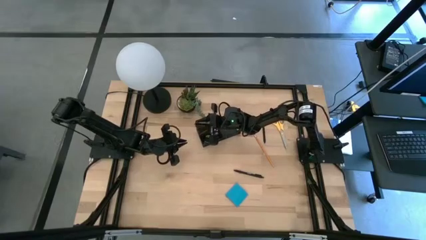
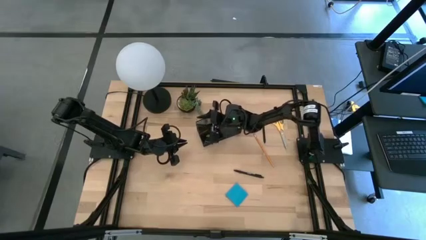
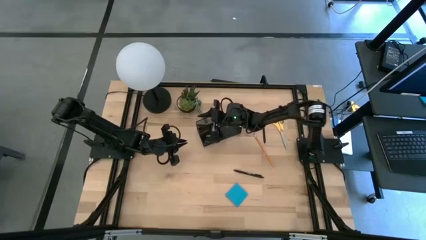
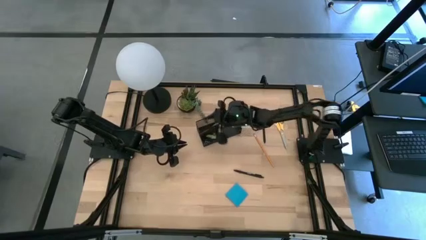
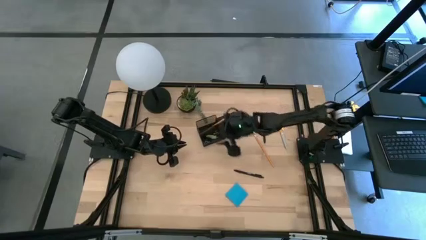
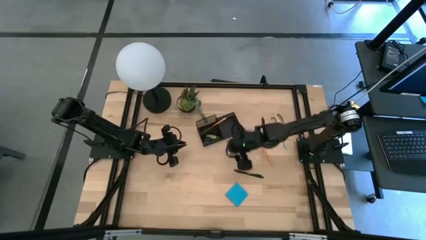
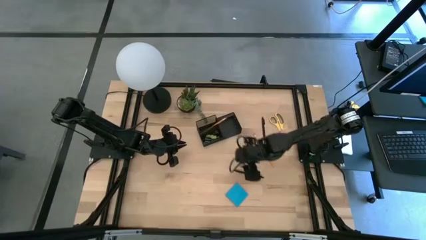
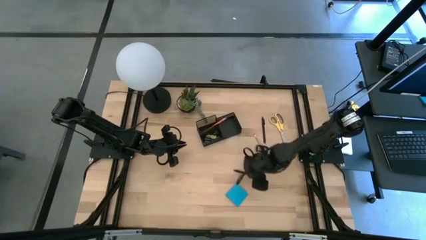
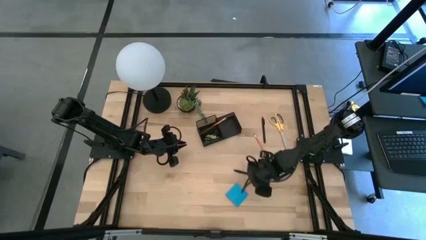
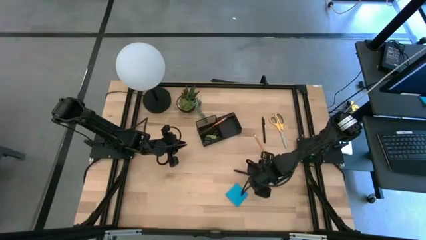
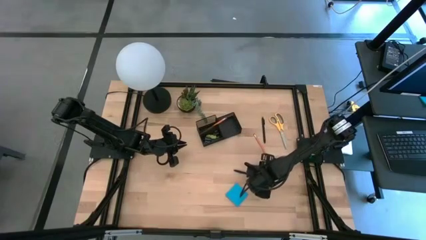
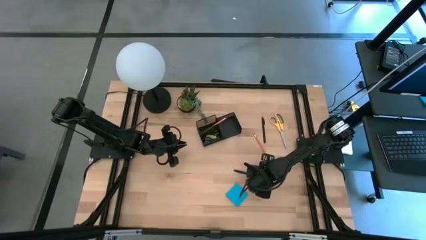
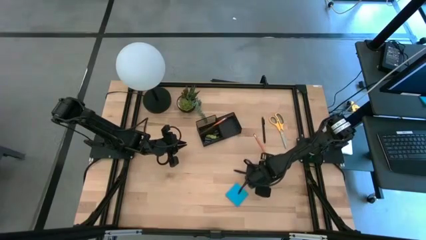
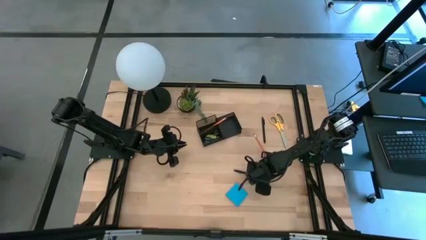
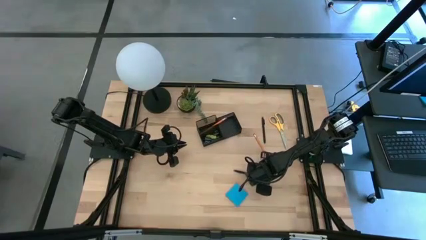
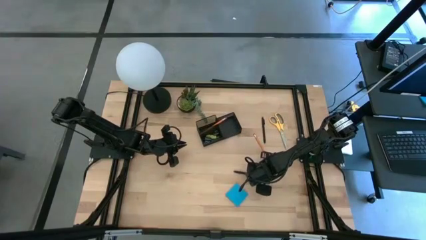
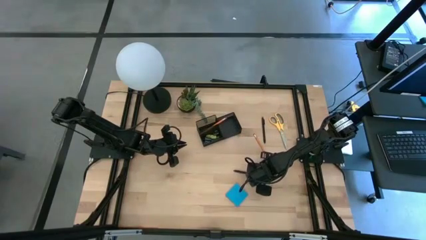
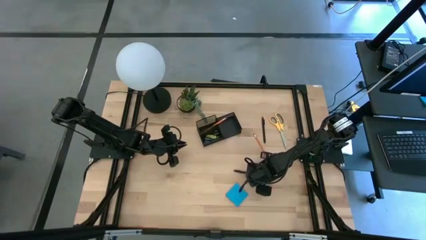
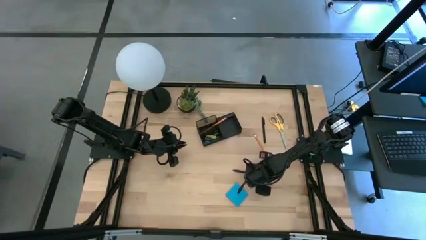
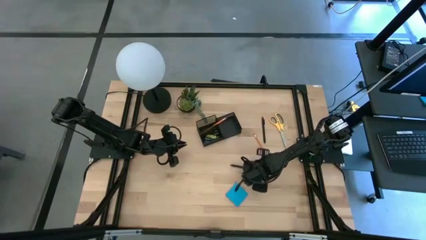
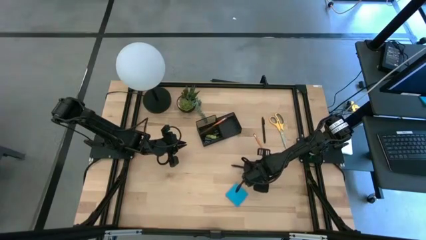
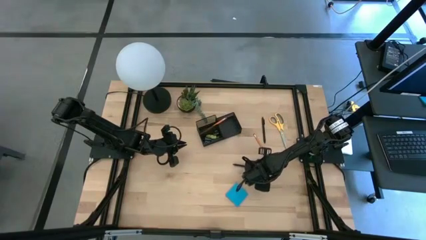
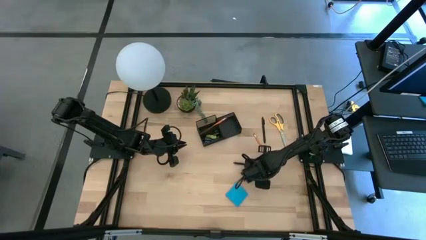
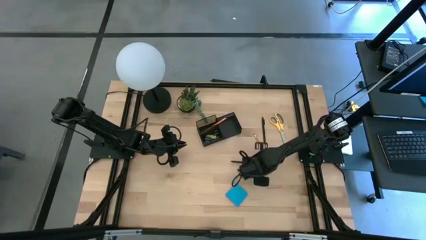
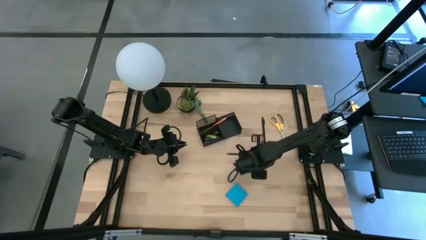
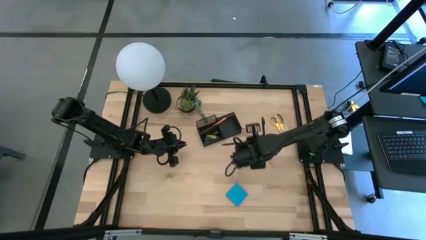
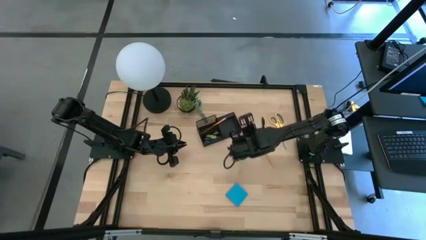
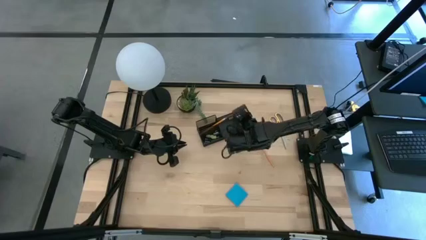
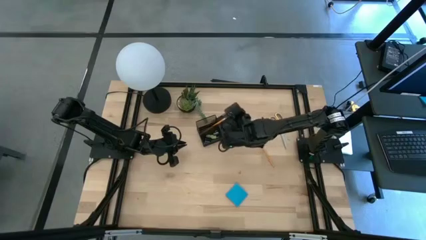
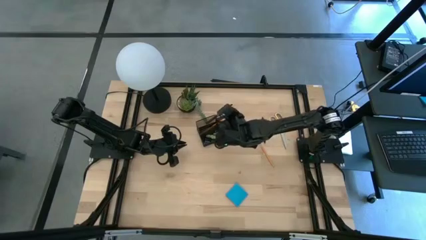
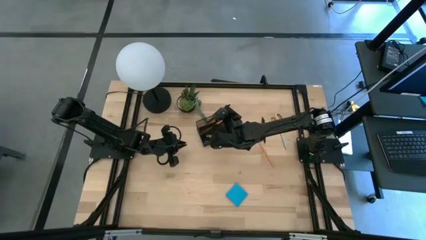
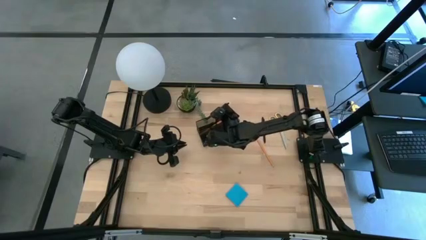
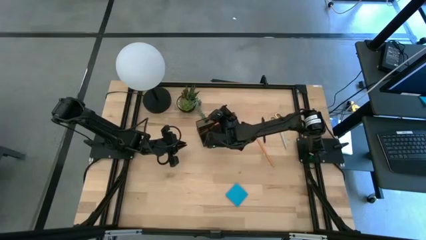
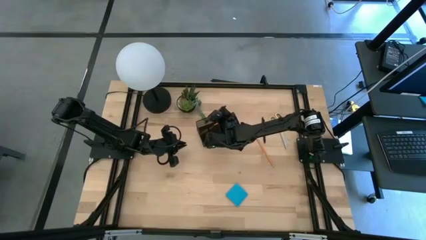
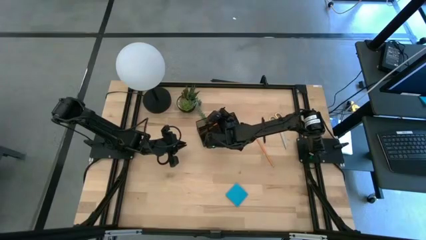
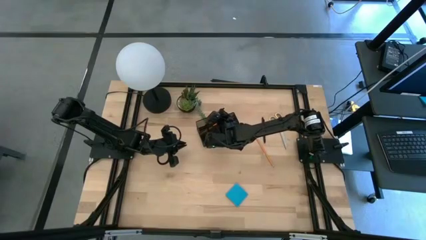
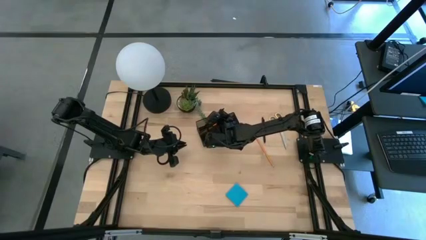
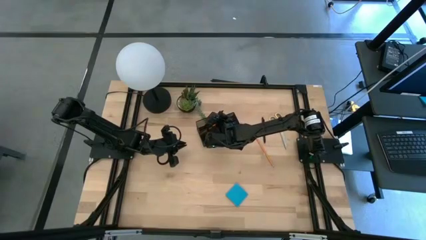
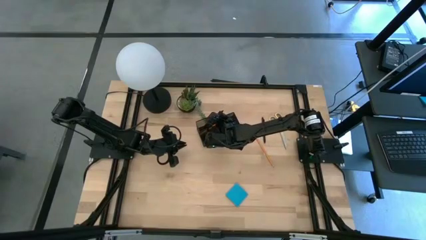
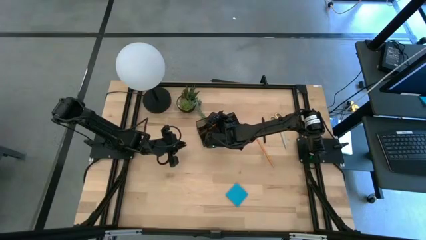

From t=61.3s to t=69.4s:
Task: Pick and place office supplies into organizer
Put the bottom black pen into the desk organizer

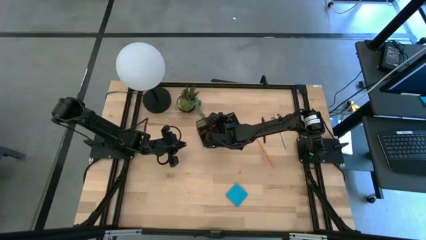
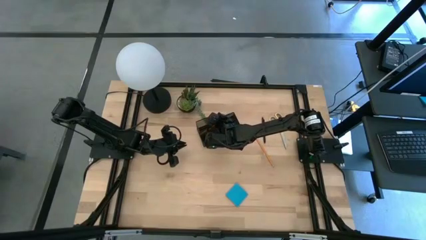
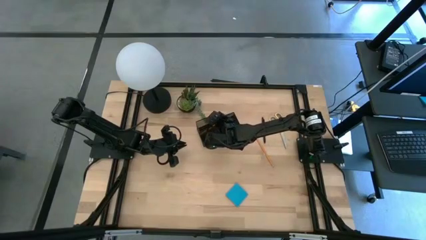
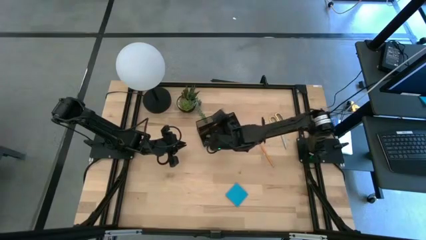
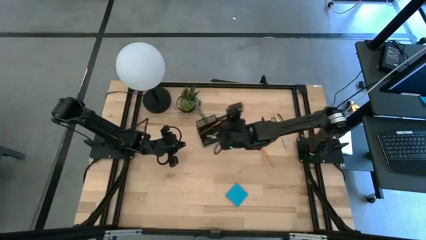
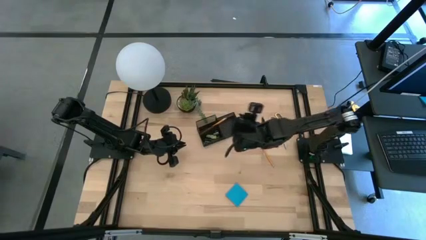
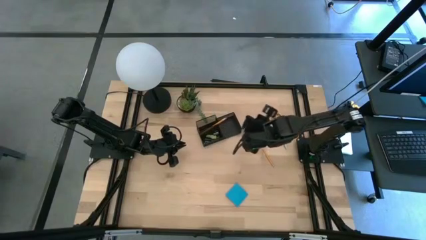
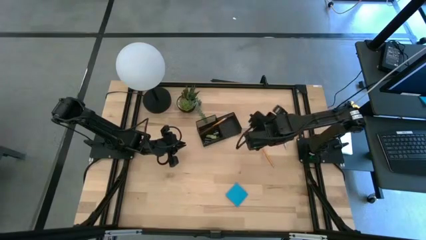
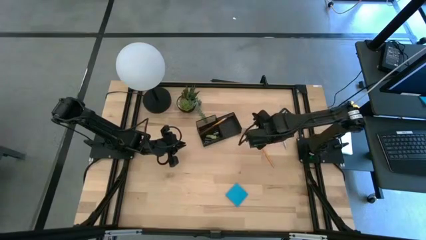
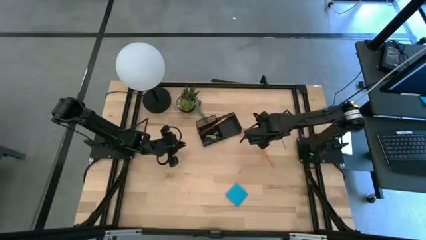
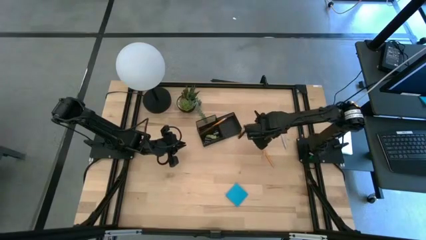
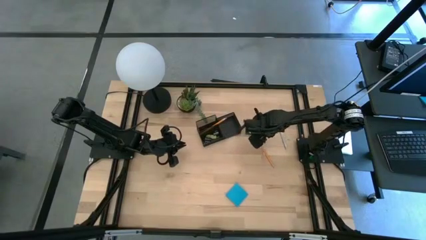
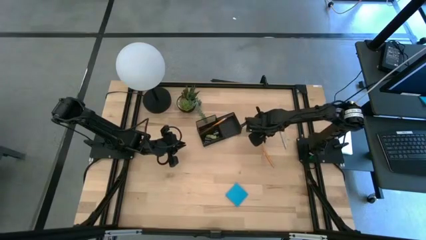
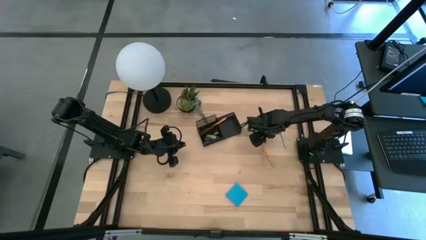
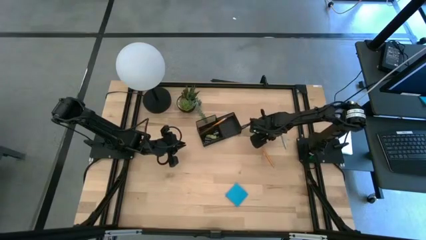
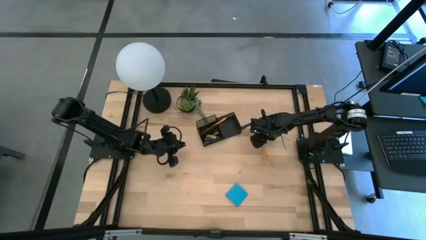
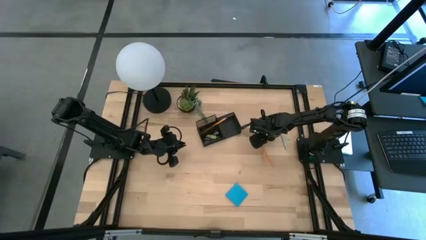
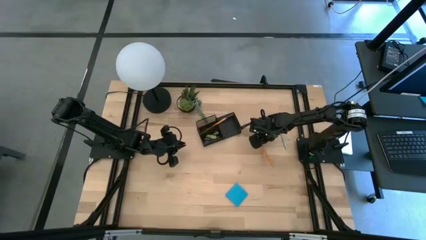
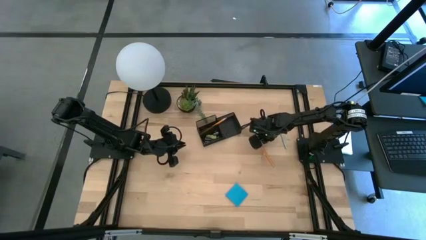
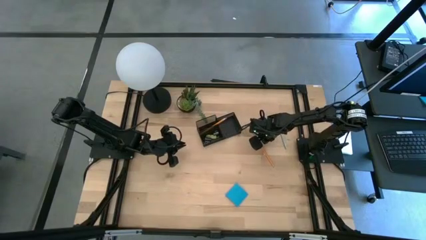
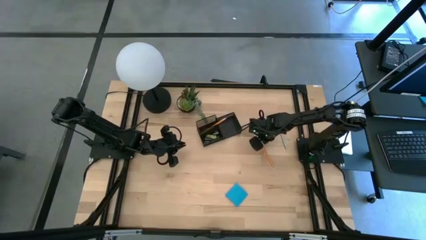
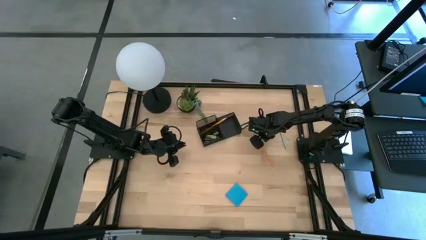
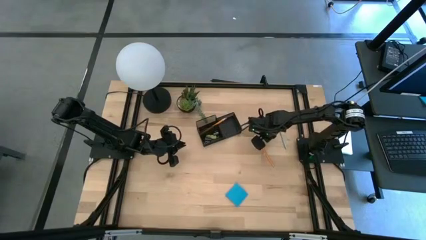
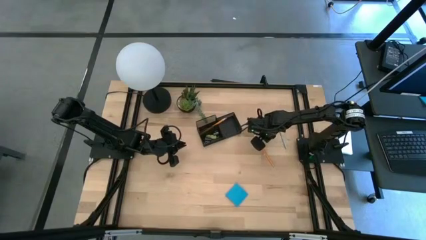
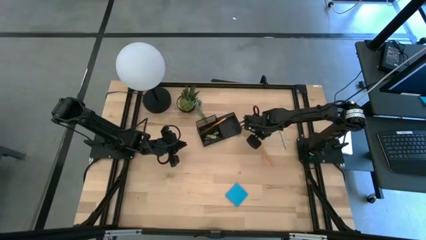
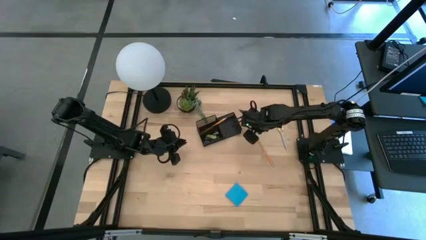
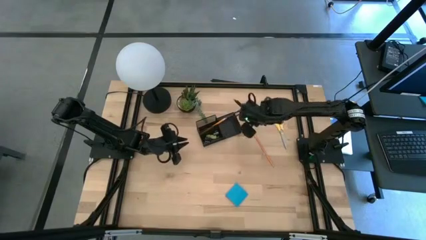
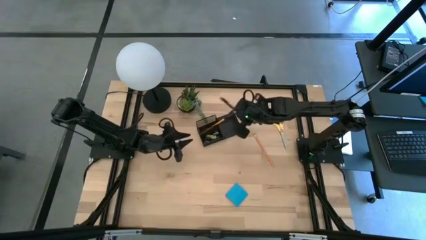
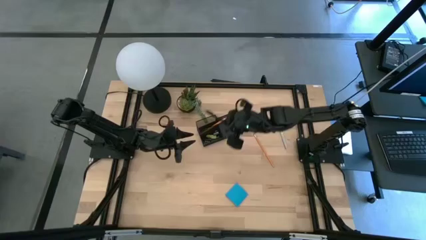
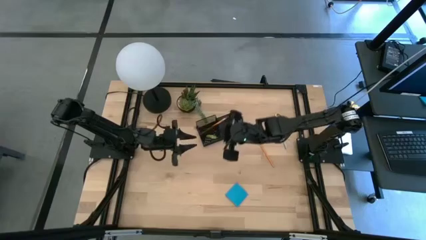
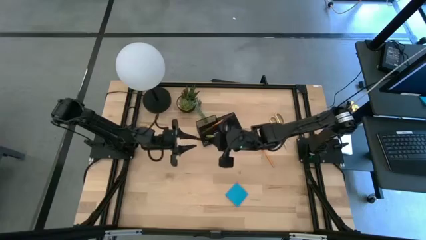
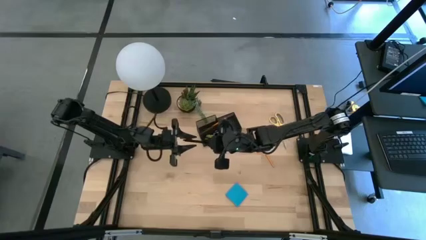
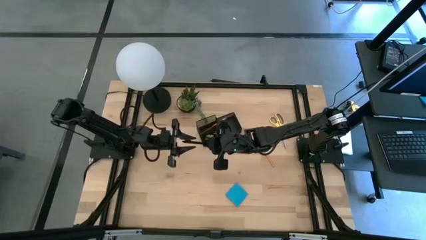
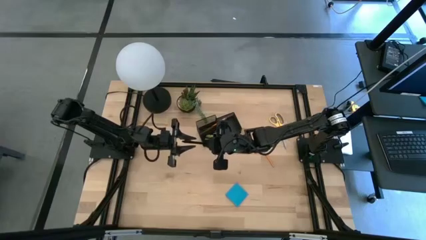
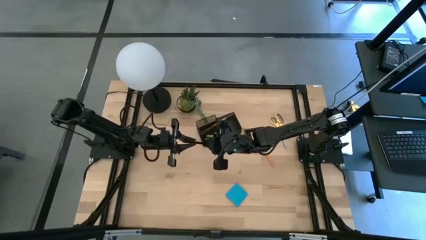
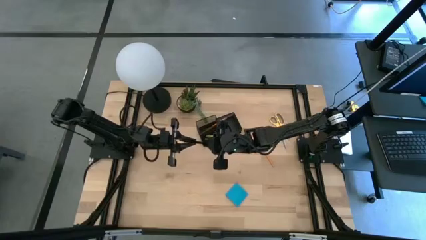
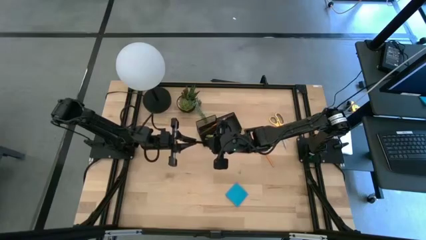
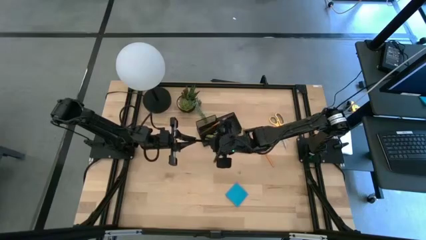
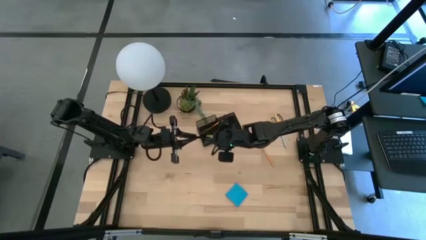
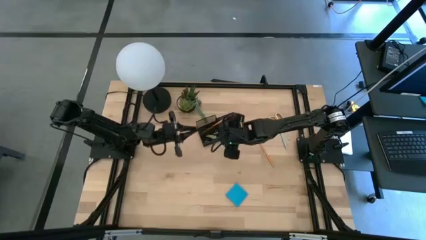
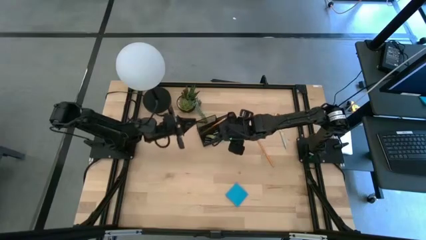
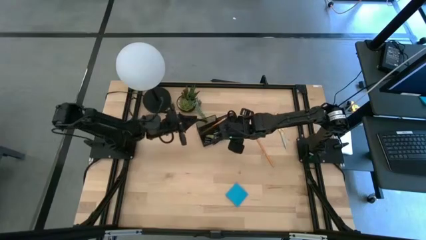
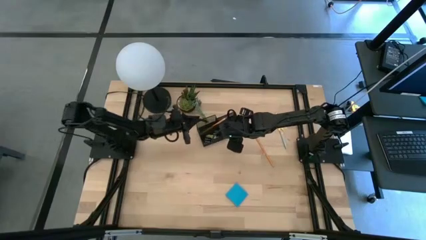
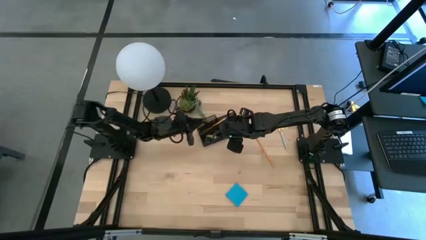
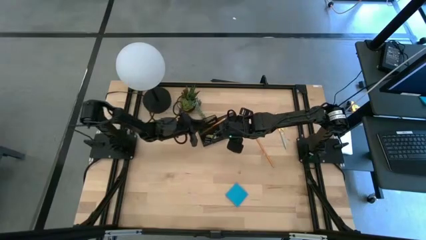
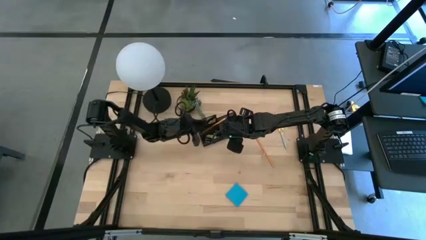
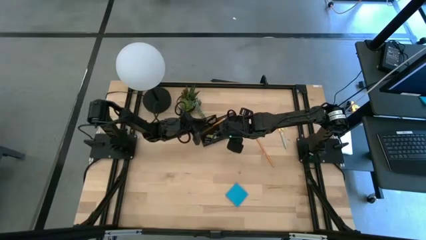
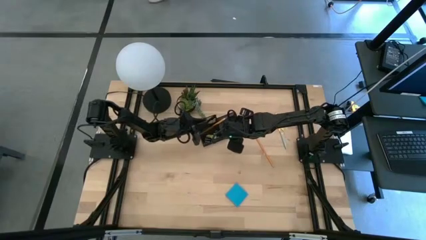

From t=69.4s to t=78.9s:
Put the black pen into the desk organizer
